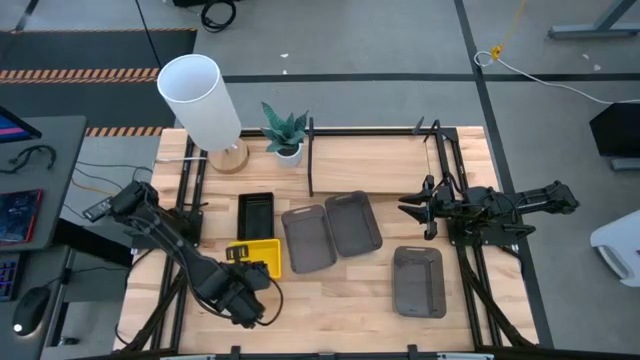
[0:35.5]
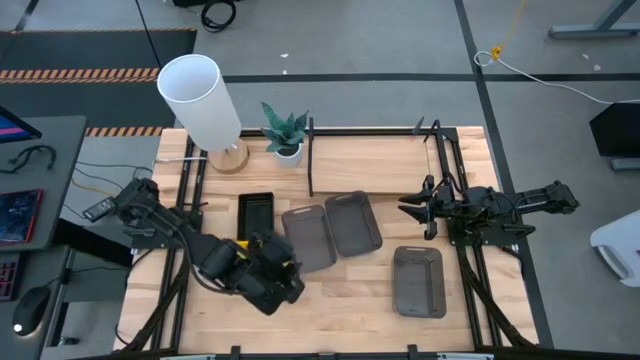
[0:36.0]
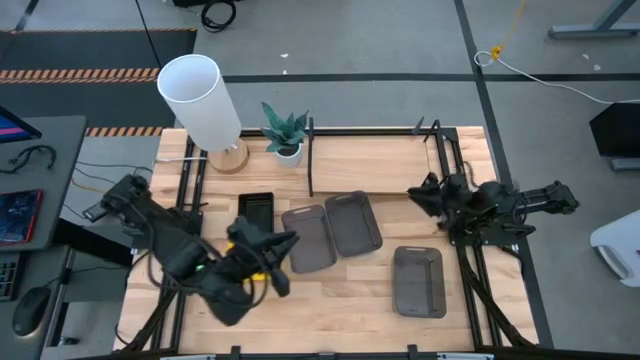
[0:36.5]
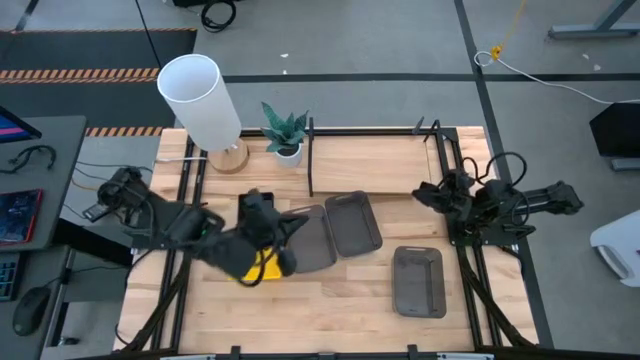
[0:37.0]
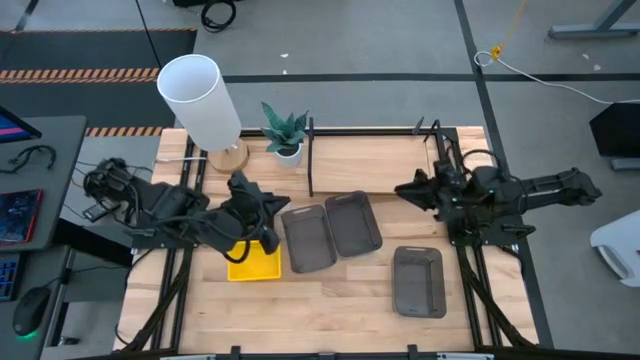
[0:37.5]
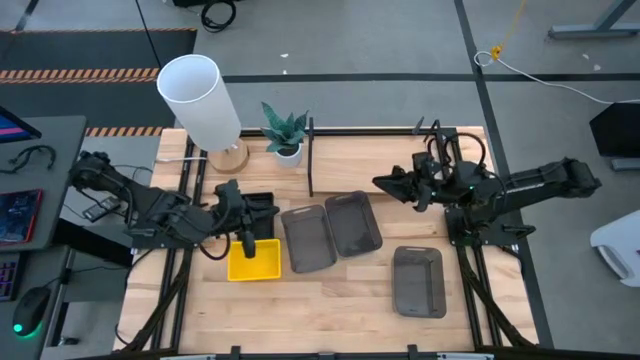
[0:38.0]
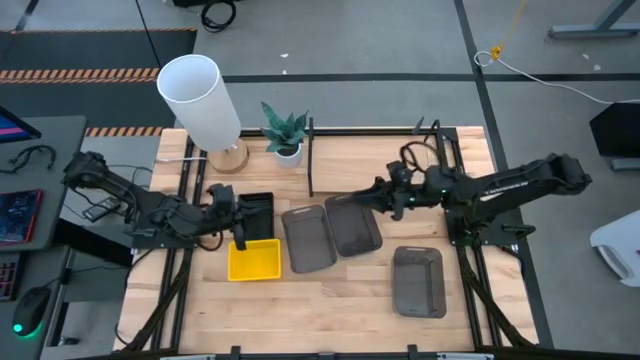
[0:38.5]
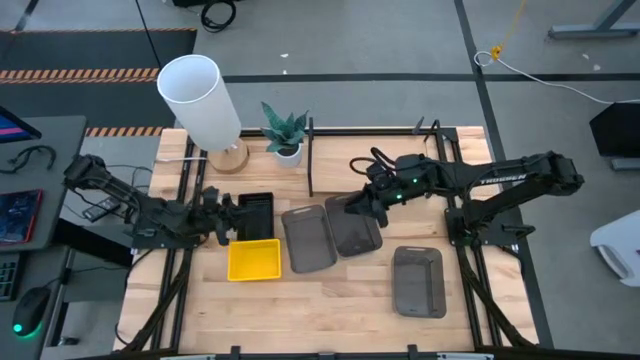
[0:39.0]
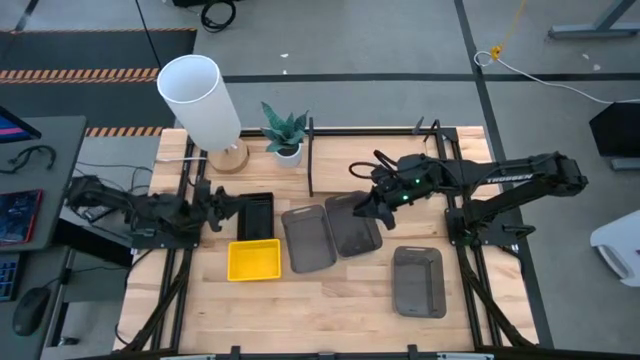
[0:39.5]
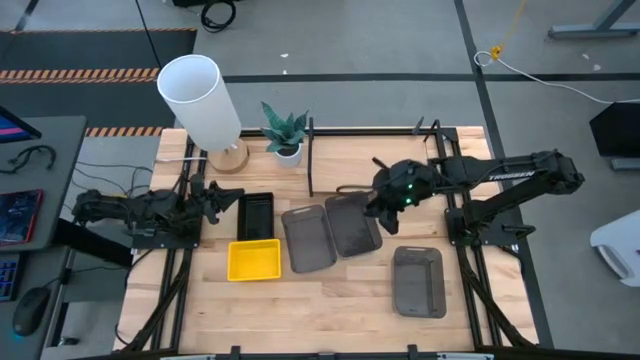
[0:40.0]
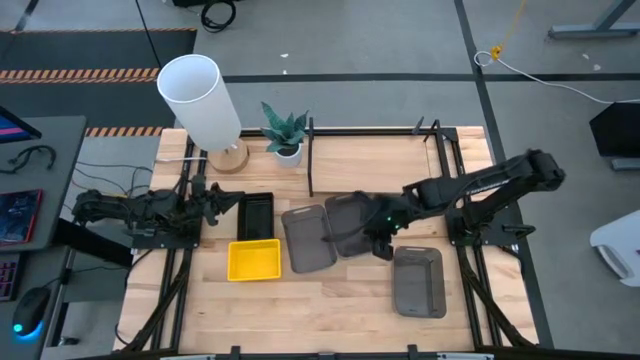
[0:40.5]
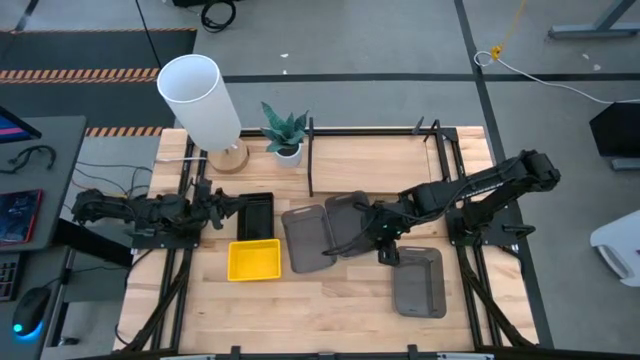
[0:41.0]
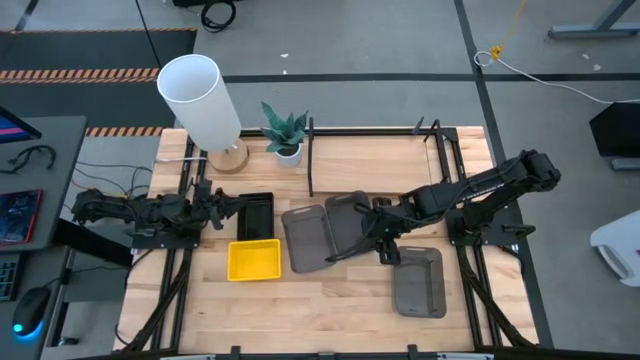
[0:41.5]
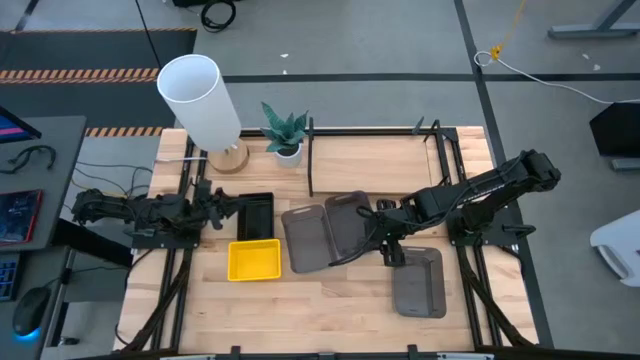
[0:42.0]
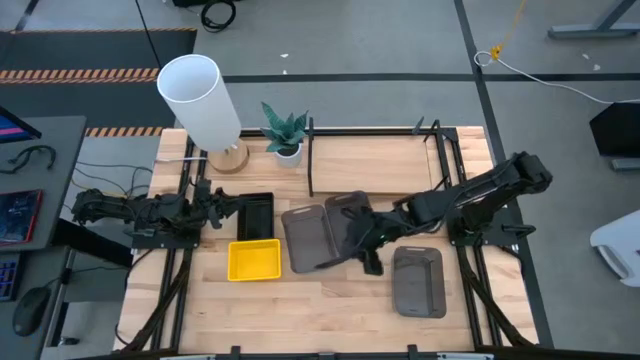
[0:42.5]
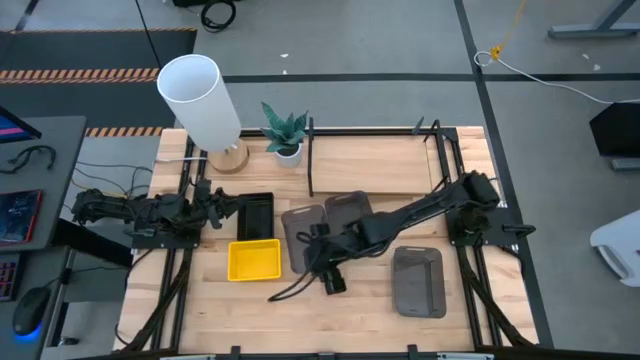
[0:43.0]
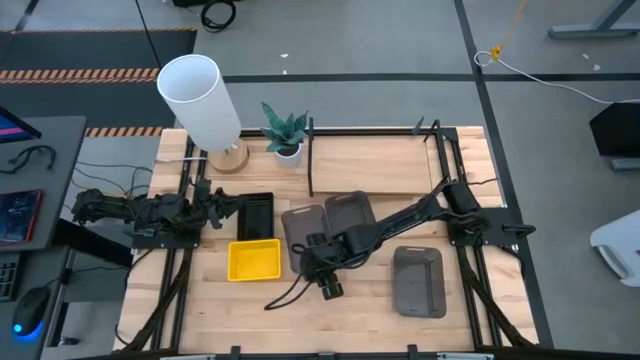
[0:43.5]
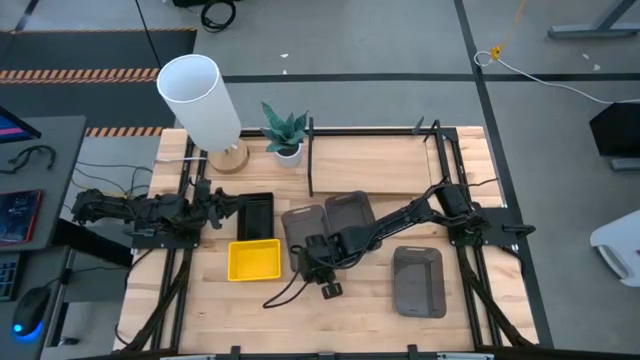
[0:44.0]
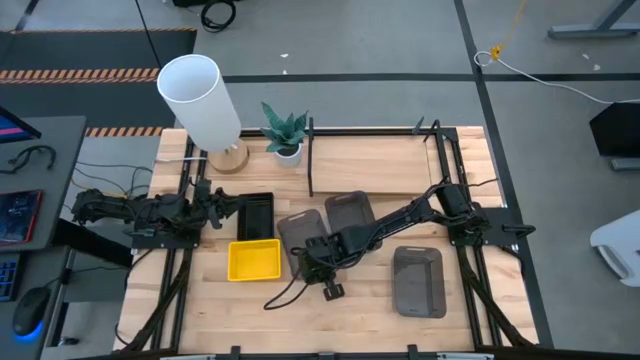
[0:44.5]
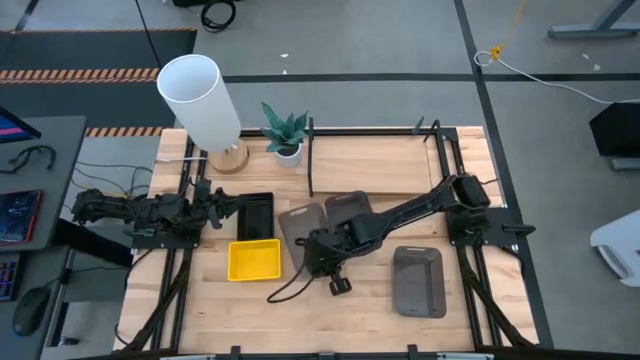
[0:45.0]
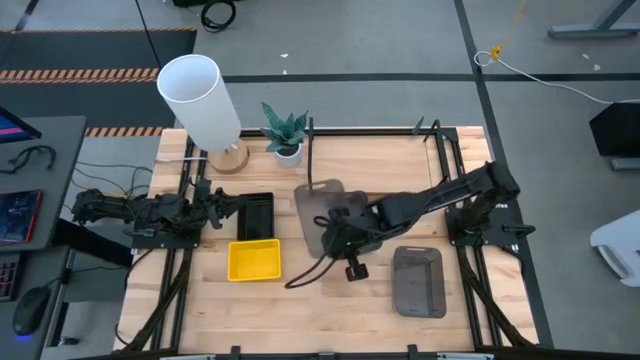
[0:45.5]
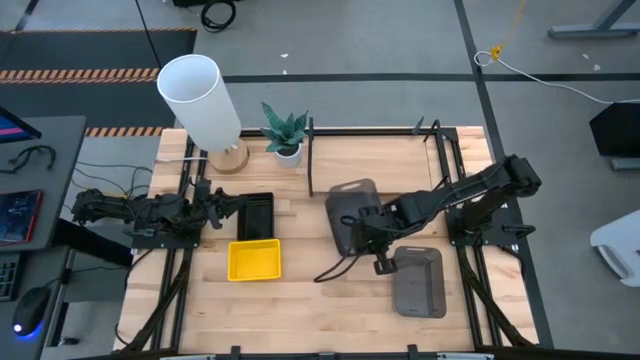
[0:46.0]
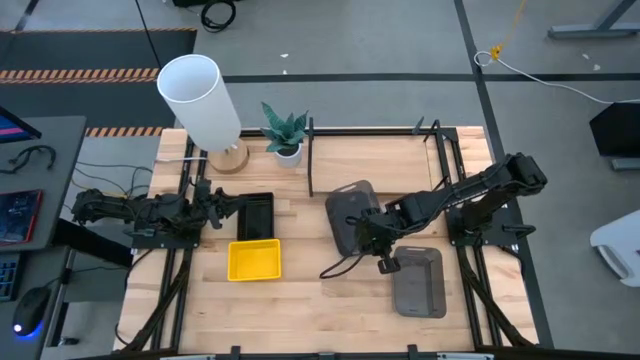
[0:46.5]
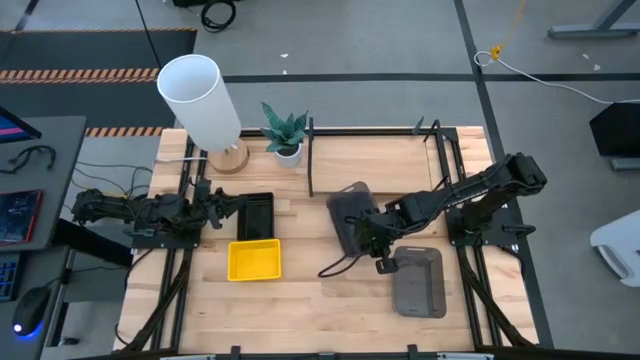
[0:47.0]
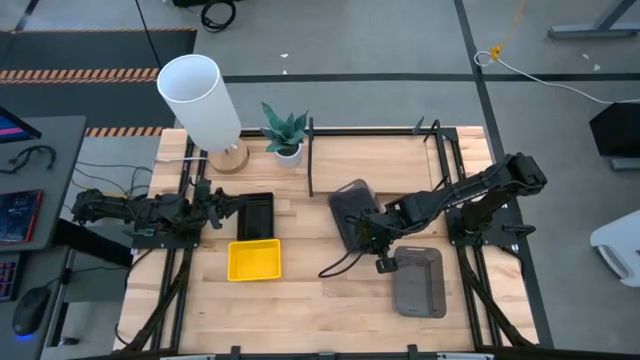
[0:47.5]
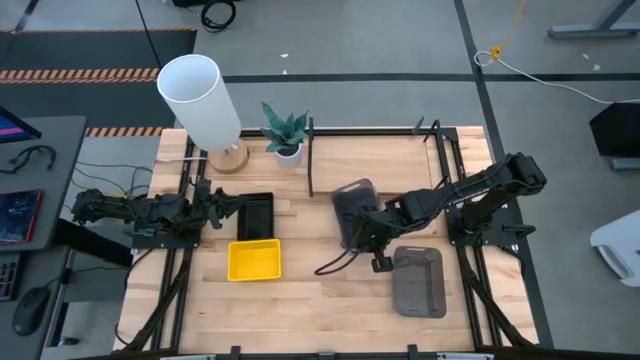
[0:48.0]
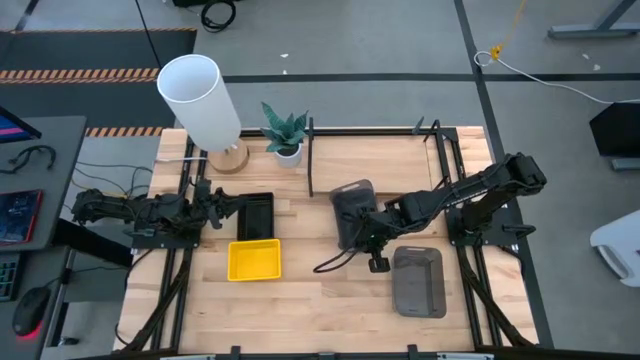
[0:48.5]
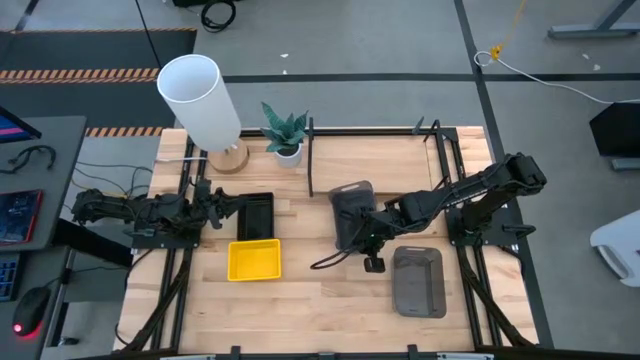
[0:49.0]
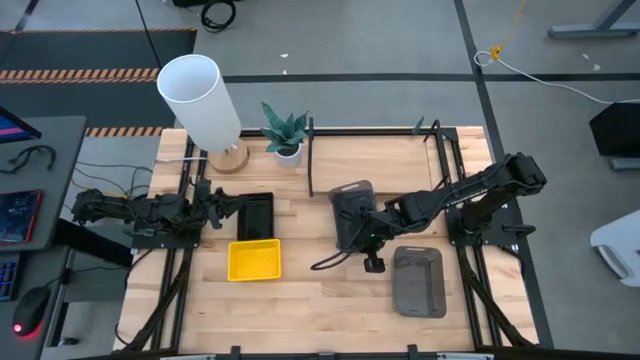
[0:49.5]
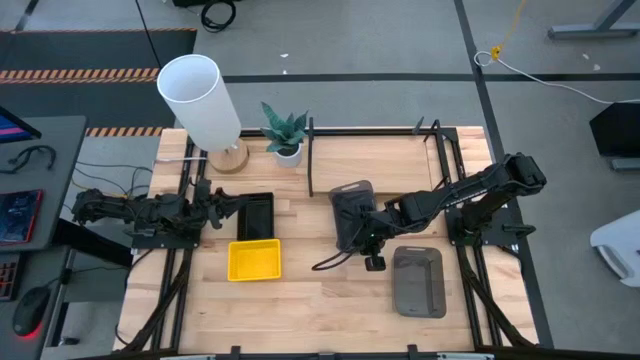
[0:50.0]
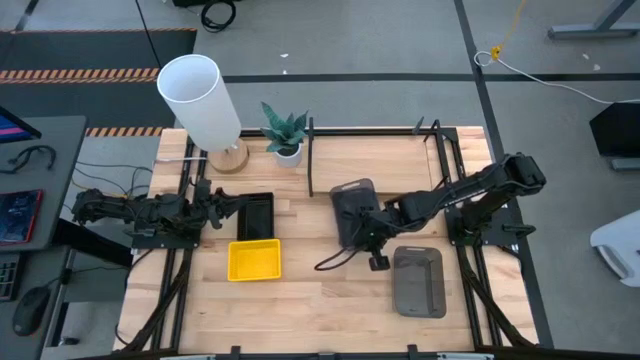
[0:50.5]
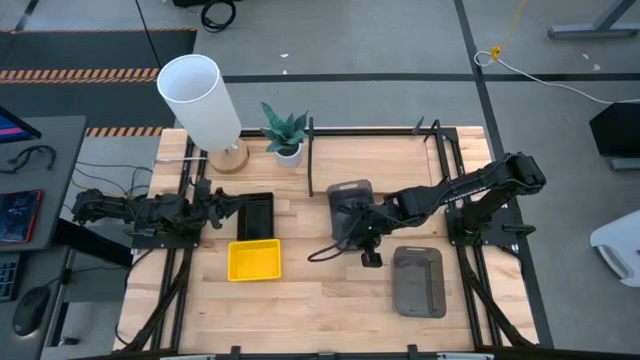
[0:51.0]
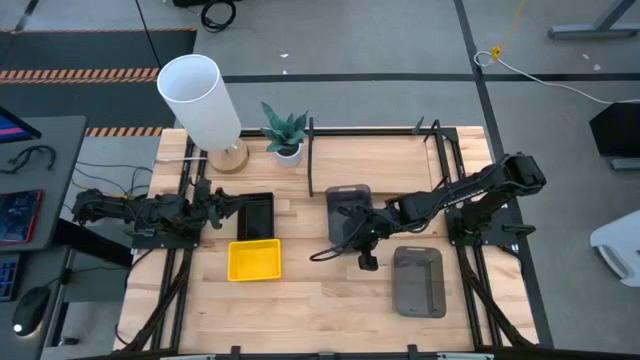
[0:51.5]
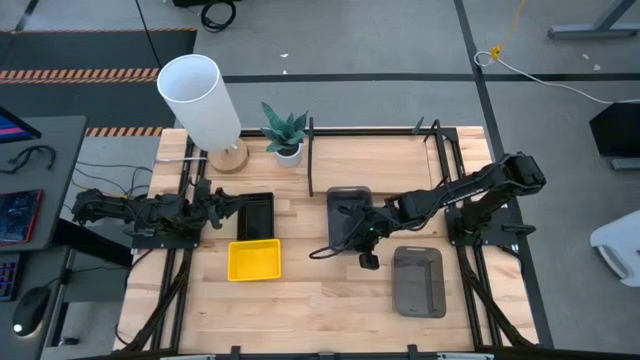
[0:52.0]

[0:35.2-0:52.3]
Task: Stack baskets on shelf by color
Stack the left gray bin on the middle gray bin

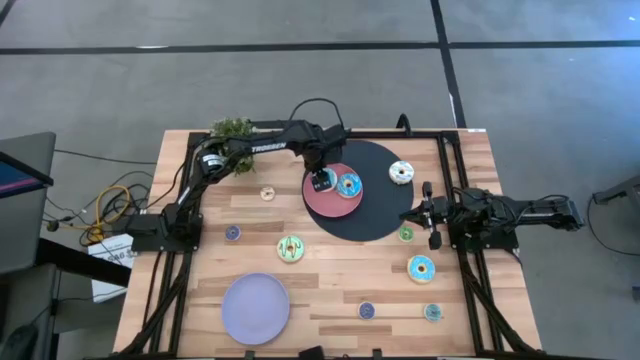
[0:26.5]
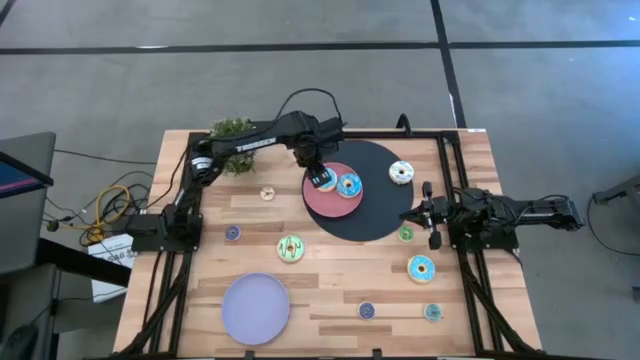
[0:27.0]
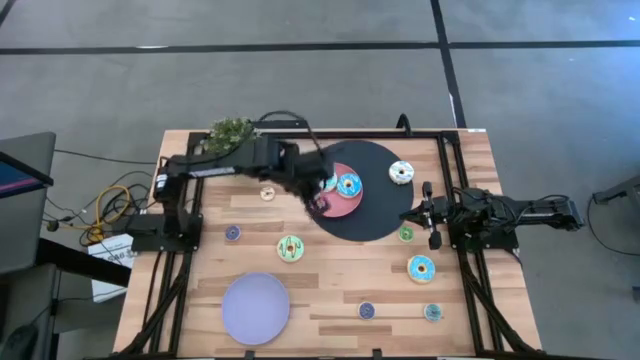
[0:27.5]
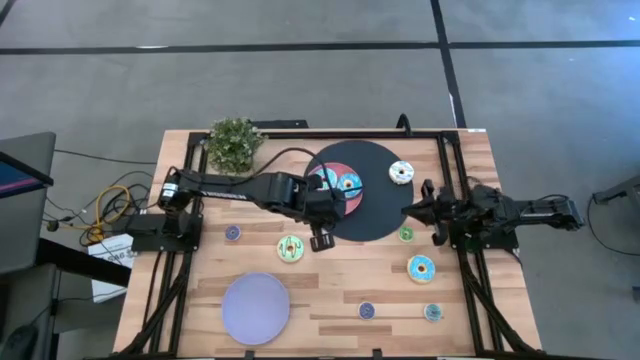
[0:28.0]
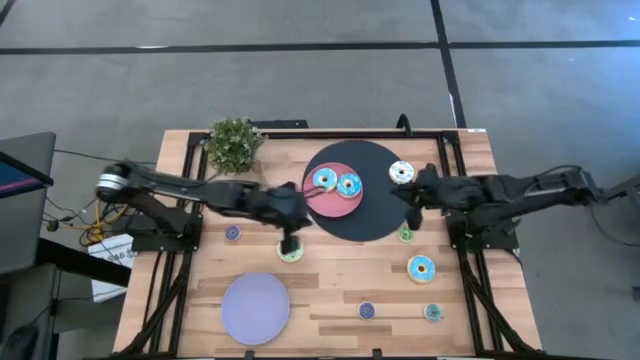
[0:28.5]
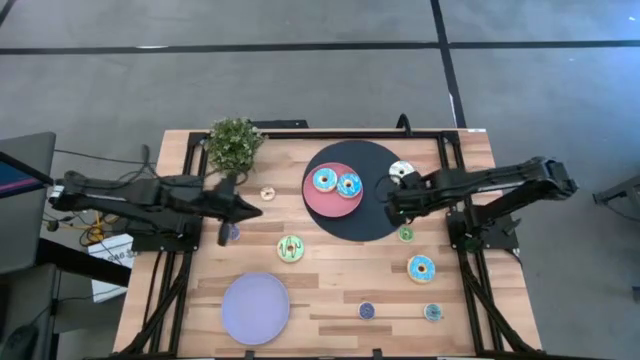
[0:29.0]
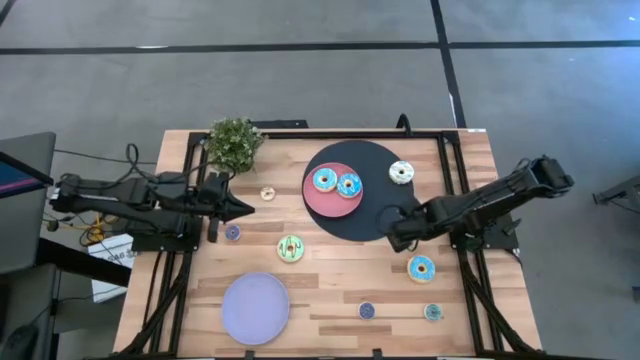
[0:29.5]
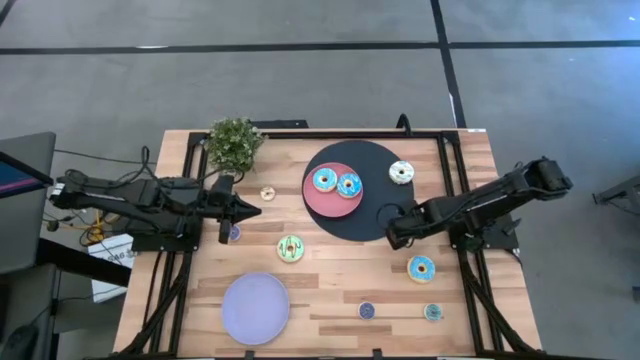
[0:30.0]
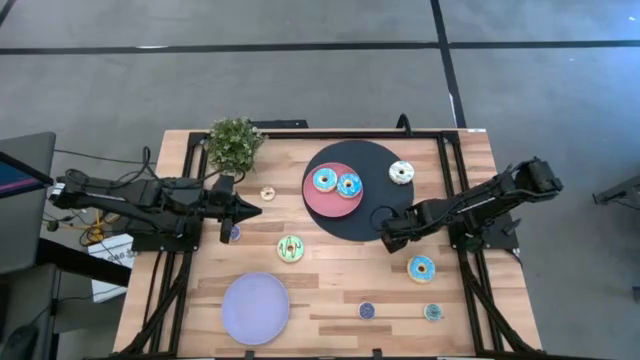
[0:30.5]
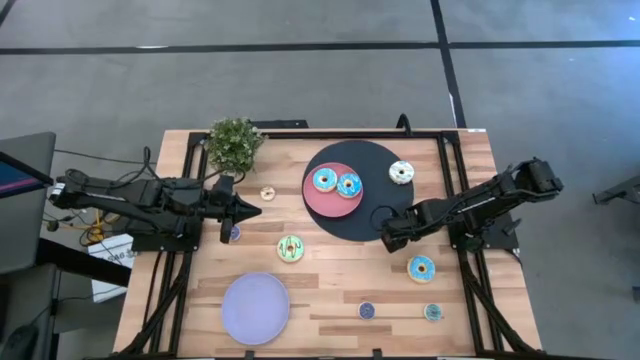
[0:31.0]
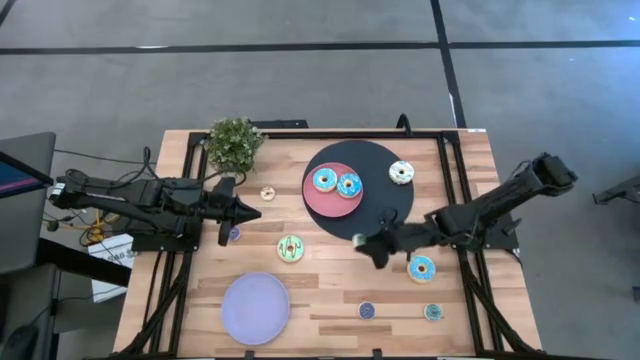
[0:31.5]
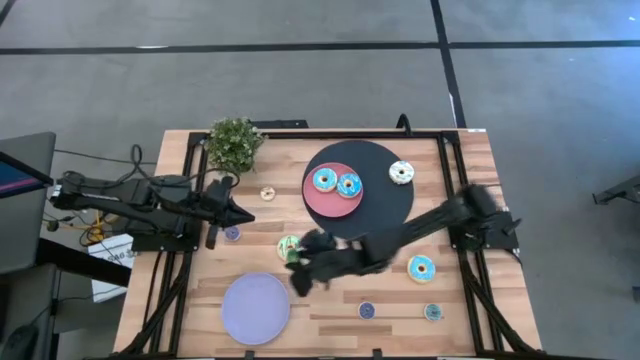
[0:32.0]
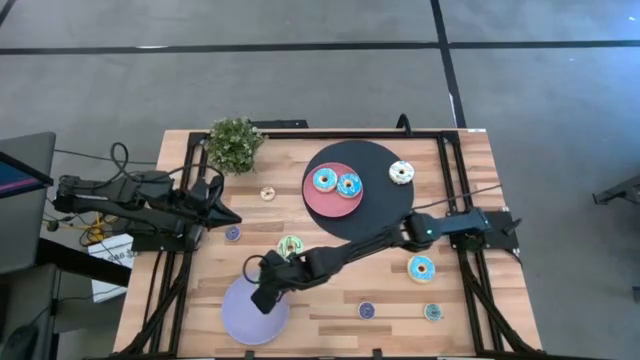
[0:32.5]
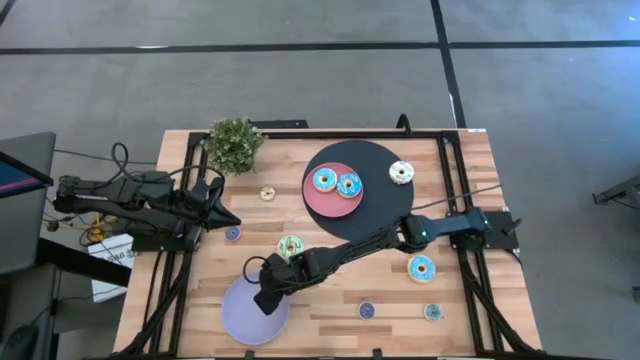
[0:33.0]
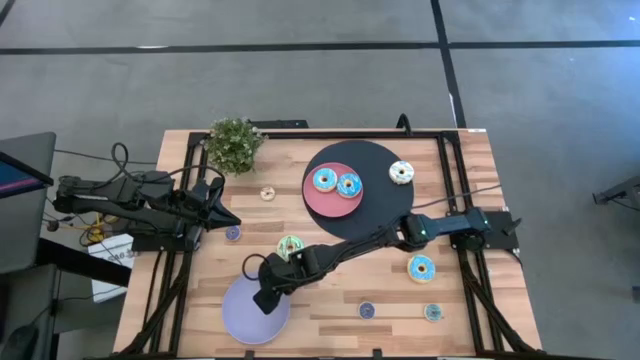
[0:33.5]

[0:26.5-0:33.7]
Task: Pick & Place donuts
Put the small green donut on the purple plate
